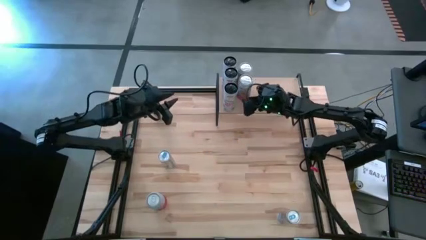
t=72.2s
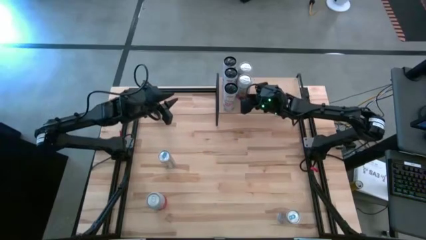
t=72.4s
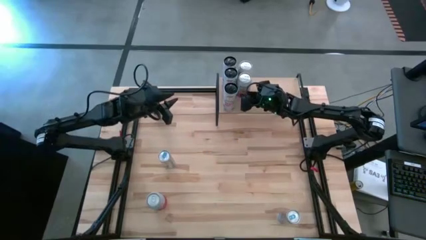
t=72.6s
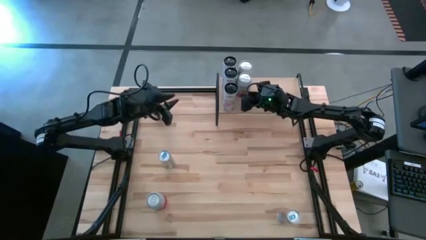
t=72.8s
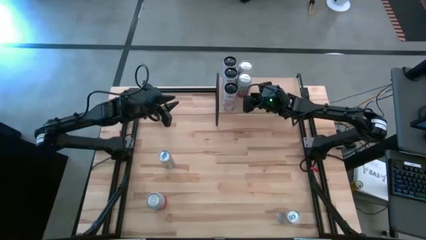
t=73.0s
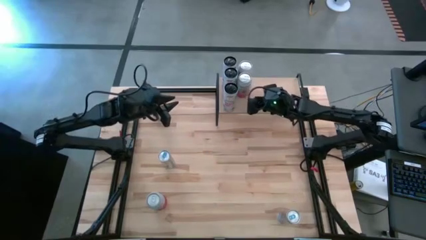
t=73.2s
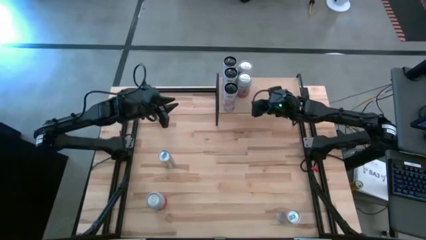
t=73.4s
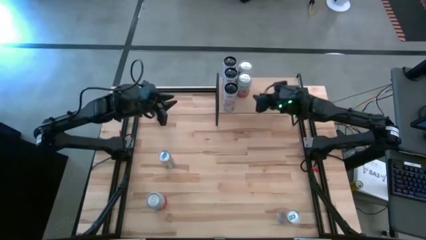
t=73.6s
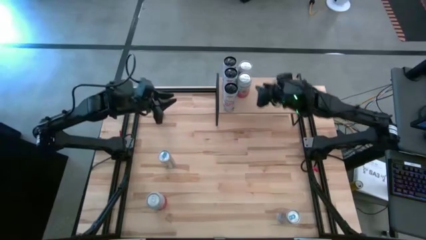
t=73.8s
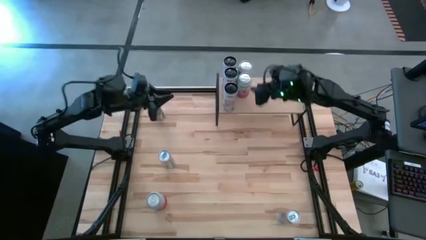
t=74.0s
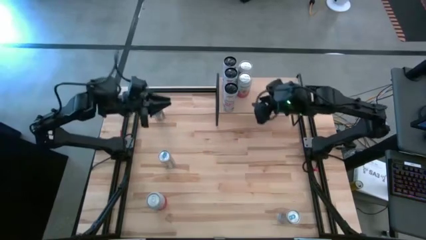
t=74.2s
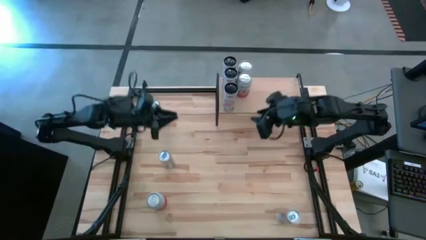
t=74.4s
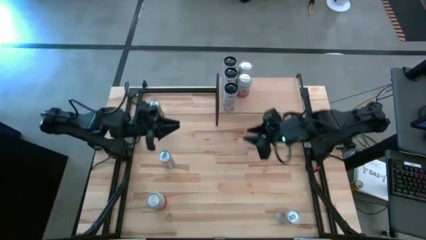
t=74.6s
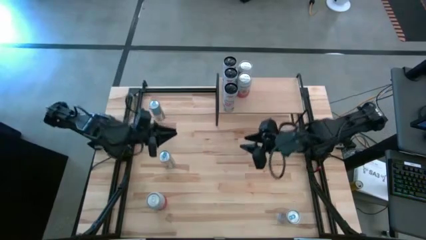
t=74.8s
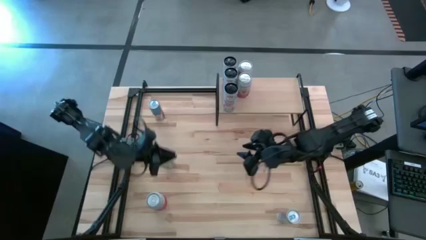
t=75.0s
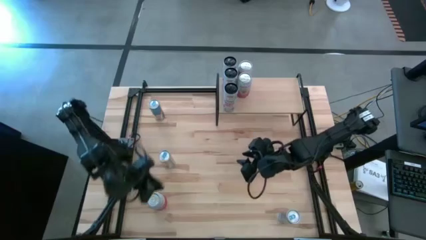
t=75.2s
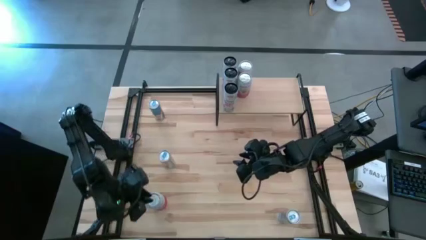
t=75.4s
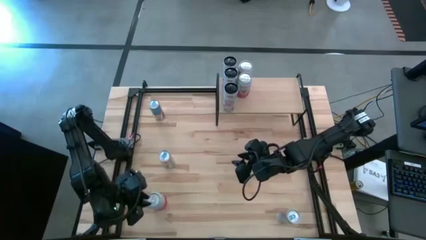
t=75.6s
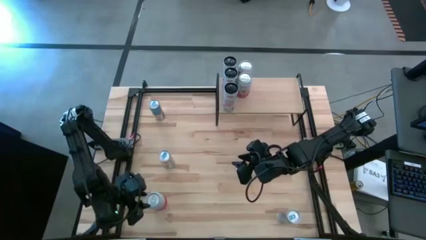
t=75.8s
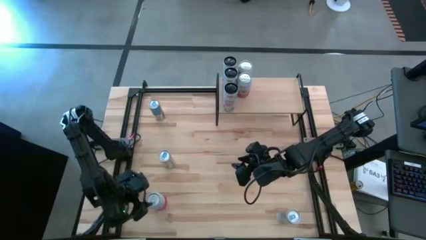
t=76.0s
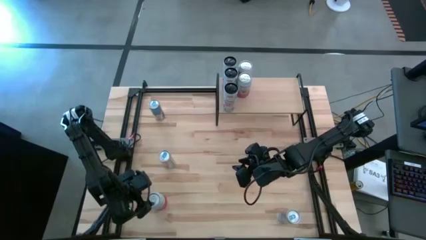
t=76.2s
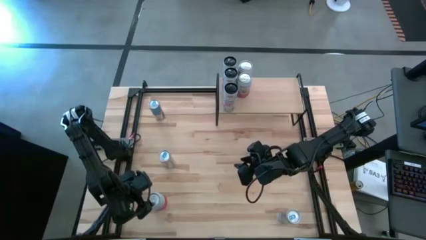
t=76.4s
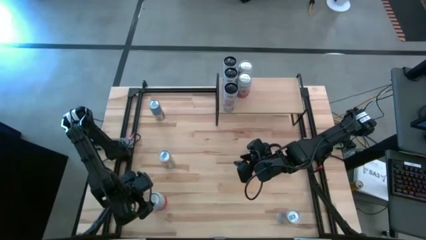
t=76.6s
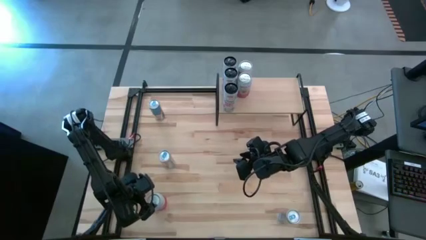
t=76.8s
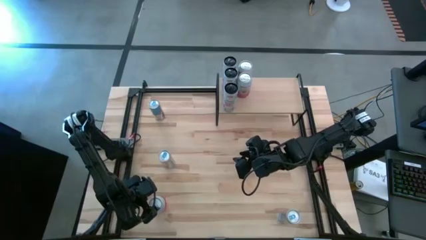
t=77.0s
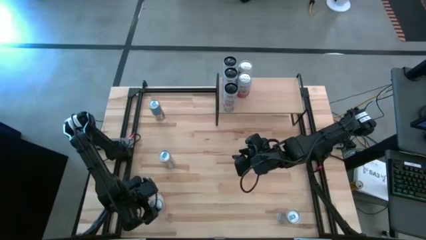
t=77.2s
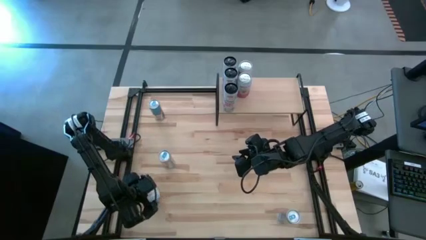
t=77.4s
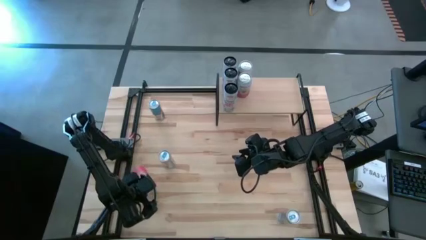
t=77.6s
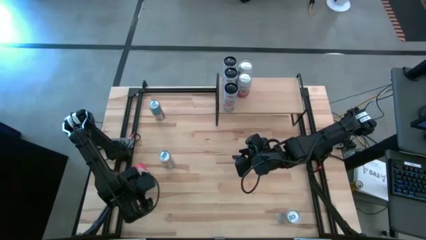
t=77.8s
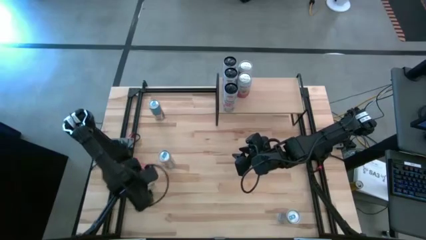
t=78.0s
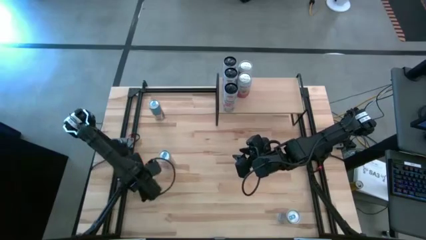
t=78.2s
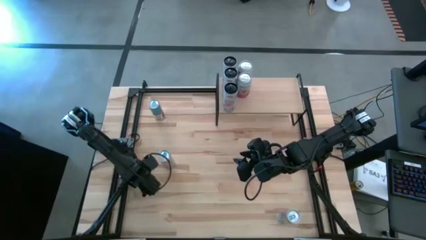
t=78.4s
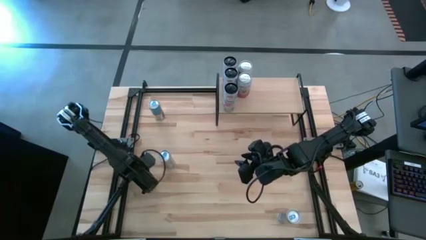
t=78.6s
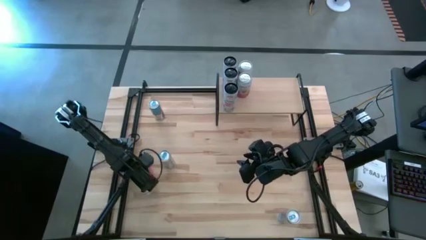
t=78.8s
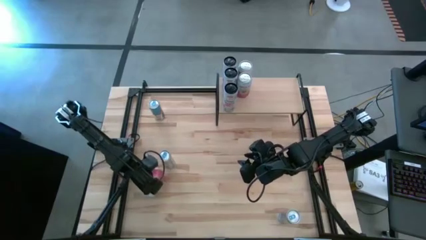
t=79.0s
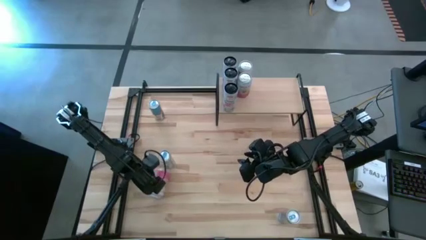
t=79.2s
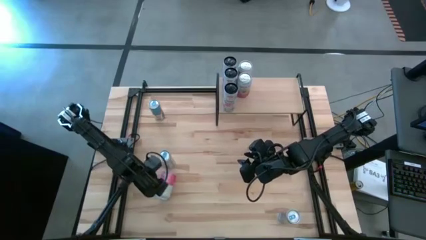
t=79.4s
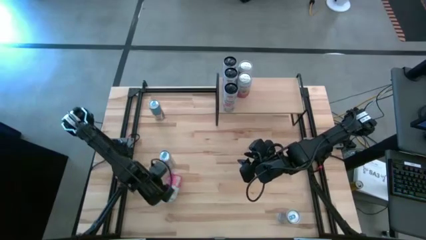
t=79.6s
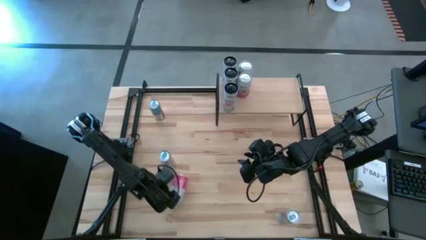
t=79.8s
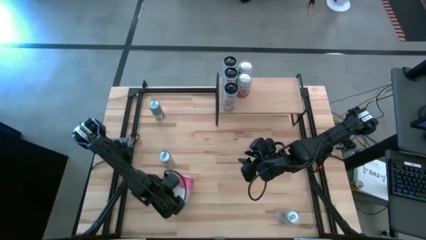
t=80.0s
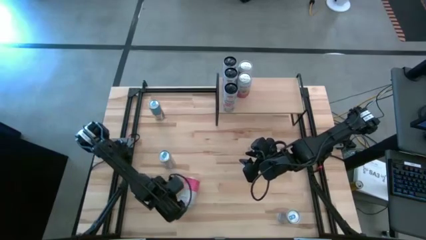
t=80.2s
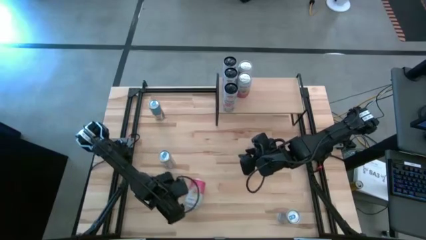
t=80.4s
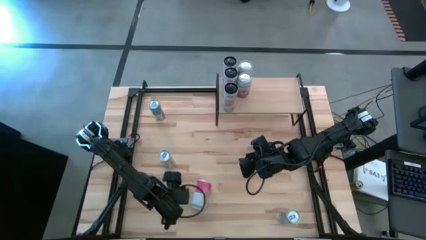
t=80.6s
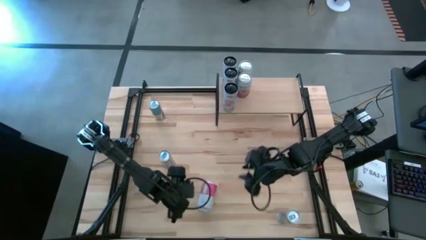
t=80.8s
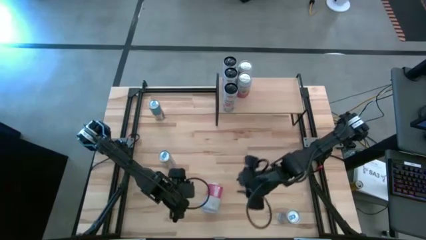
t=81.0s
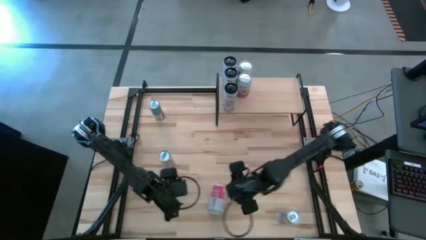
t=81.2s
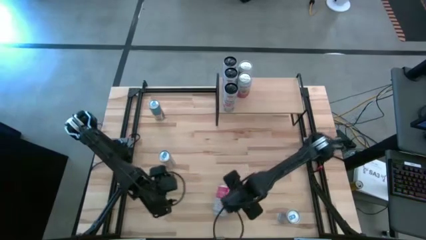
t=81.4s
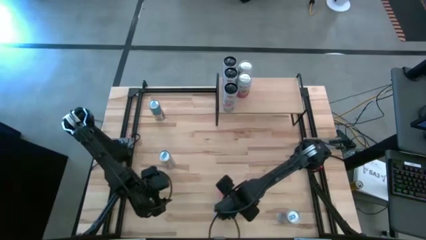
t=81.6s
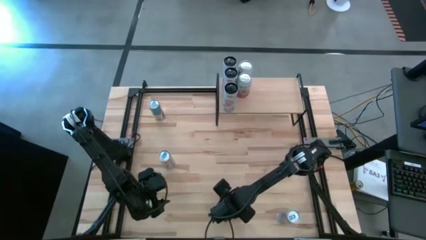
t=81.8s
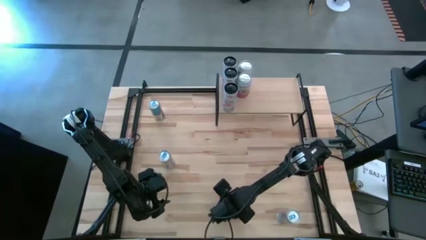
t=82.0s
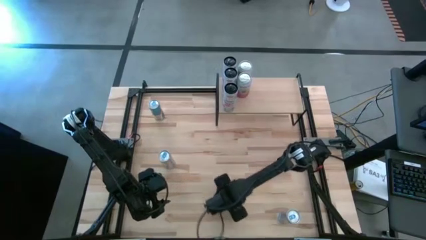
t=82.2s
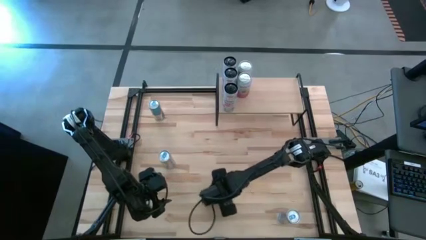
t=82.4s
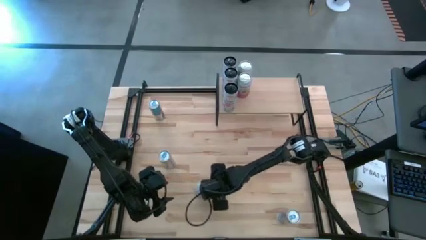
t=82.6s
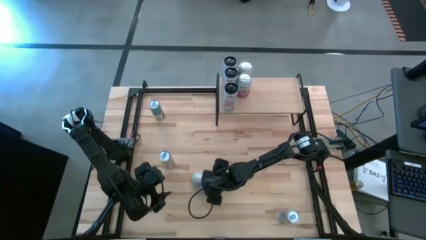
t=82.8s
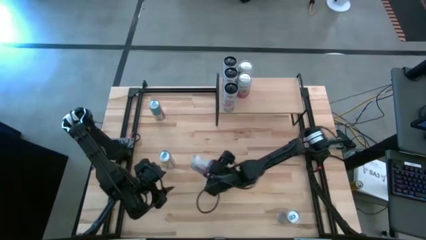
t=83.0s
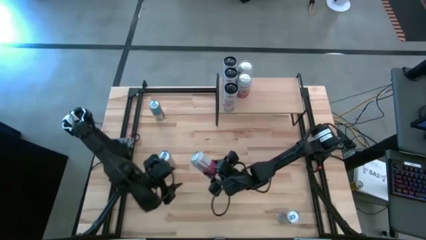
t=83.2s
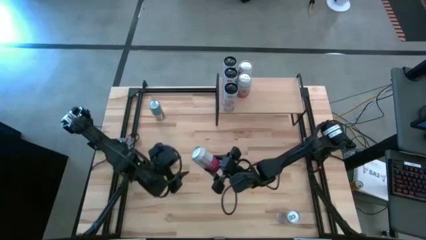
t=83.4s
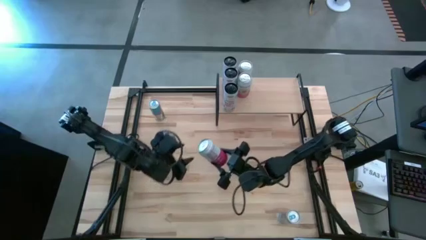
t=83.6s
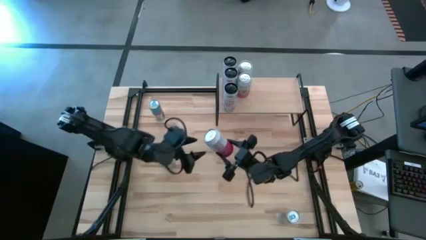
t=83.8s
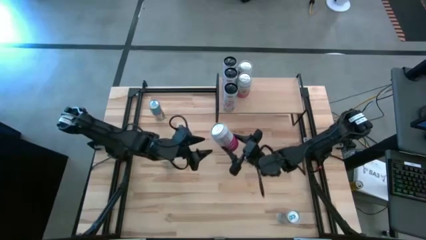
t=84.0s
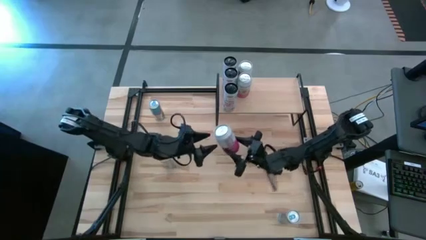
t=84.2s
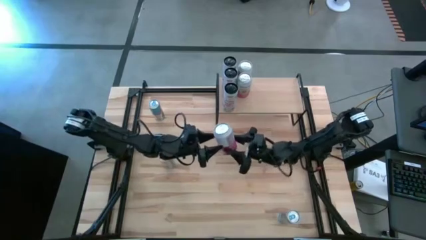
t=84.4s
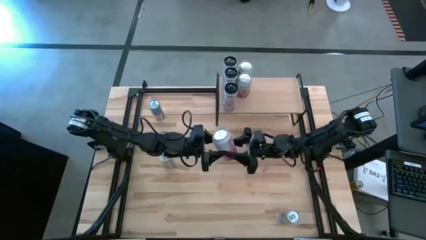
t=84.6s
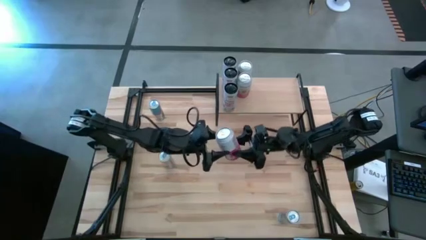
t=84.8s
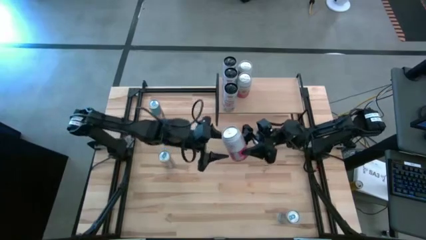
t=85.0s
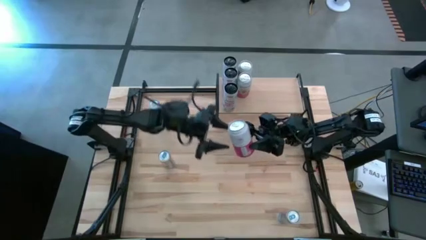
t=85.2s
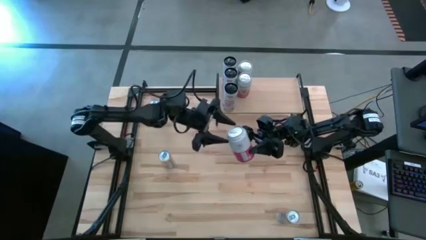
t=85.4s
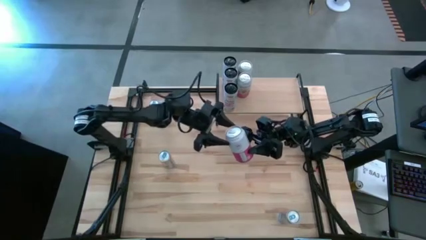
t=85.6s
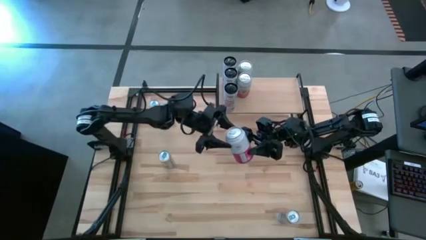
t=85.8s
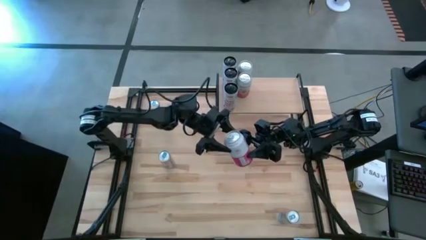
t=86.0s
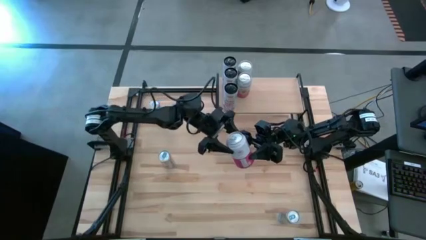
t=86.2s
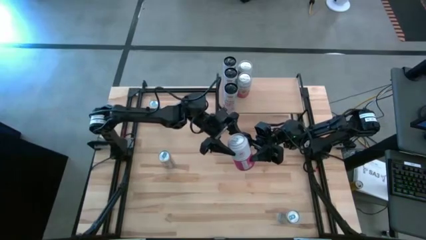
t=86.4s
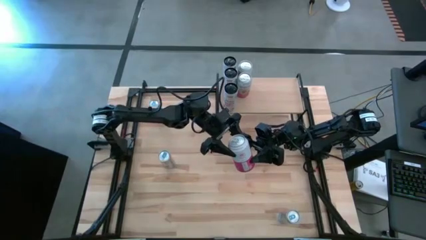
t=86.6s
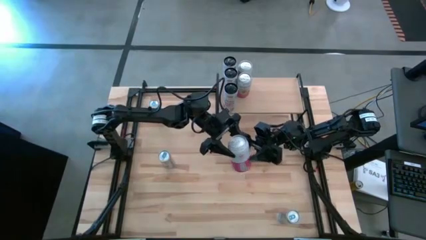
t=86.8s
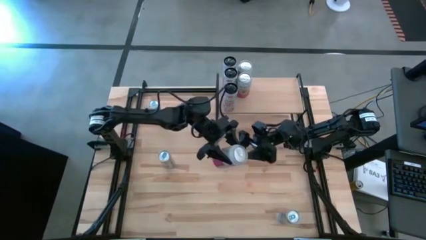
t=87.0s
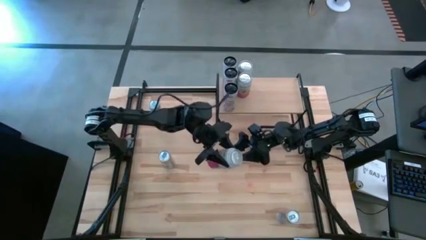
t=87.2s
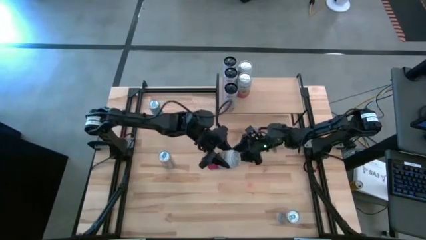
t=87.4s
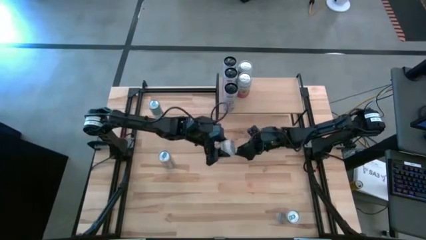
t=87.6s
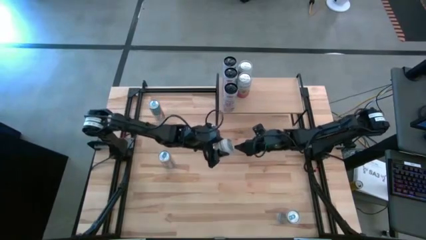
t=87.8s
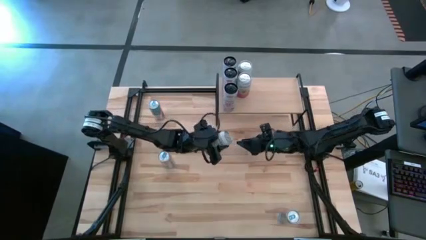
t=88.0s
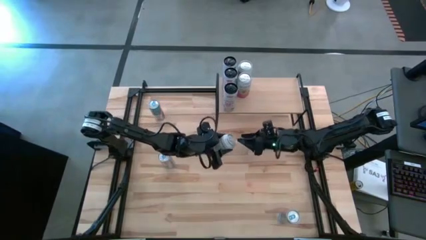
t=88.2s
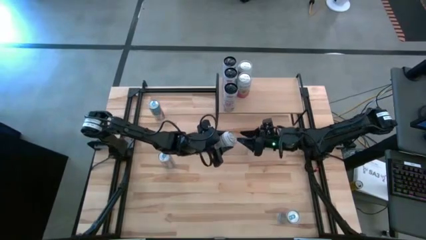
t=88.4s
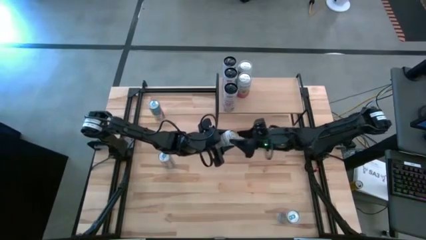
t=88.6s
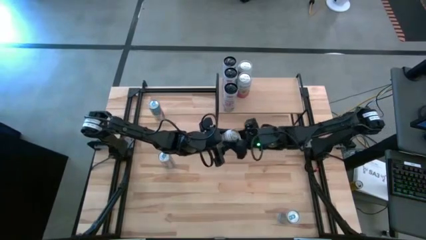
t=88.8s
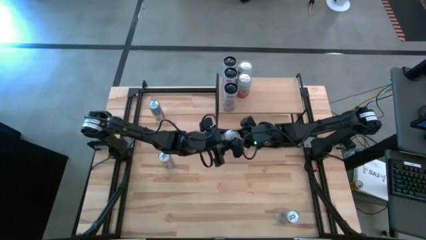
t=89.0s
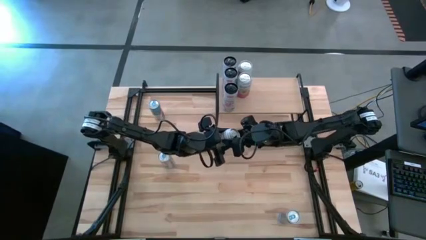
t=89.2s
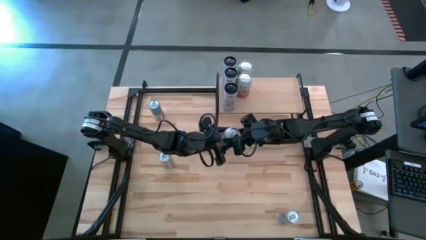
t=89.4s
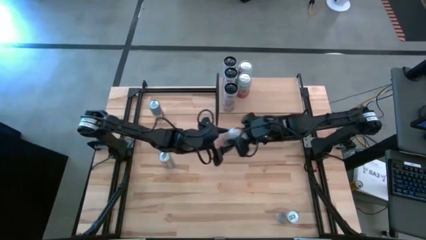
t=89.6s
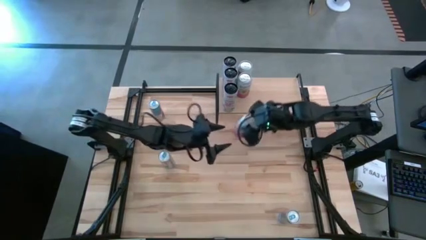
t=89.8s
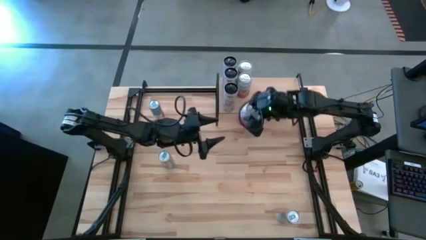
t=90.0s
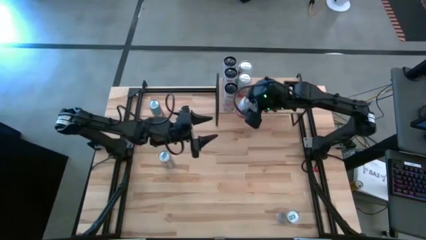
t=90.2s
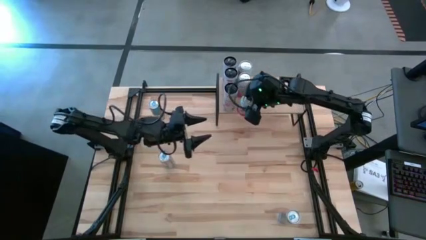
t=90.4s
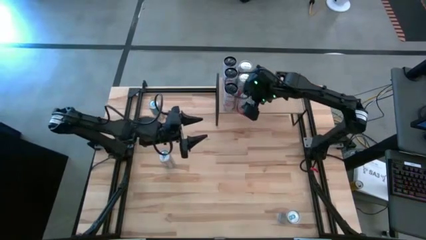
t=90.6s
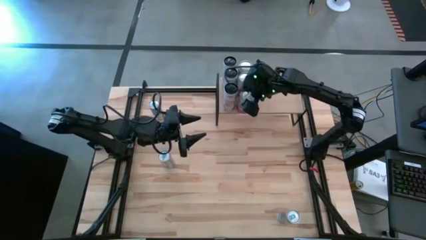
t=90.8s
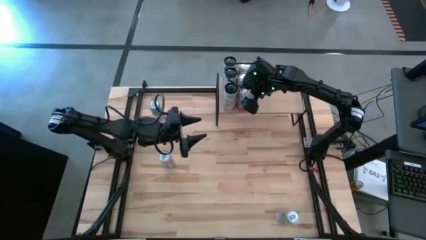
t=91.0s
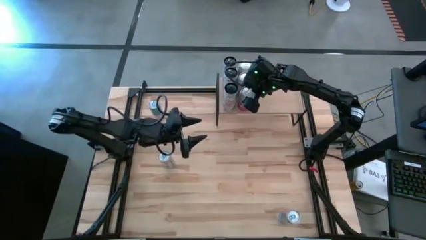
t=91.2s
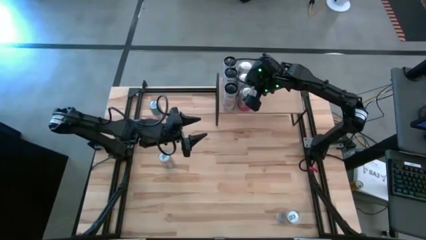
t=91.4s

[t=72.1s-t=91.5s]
Task: Place canned beverage on shelf
Put the pink and white soda can aligned with the other pink soda can on the shelf
